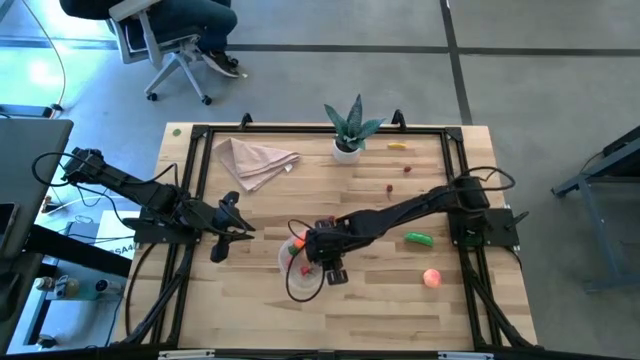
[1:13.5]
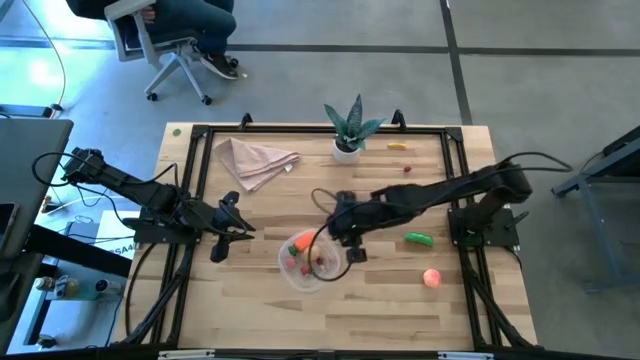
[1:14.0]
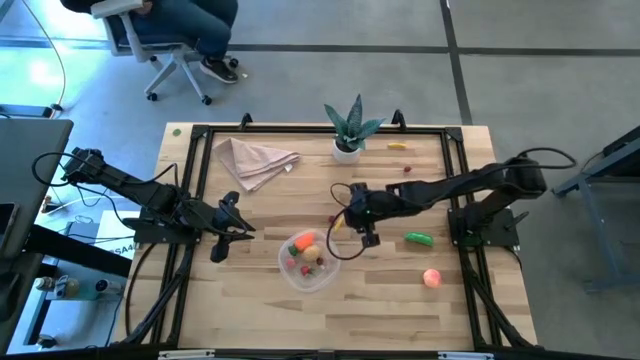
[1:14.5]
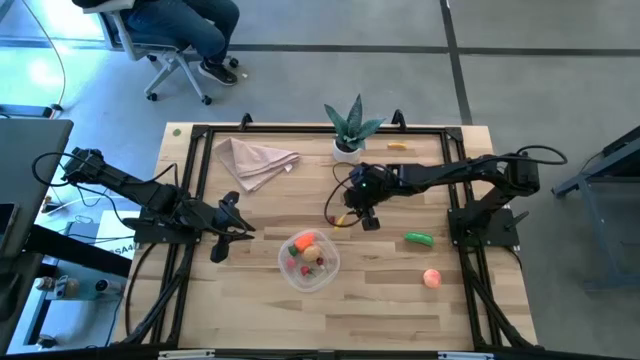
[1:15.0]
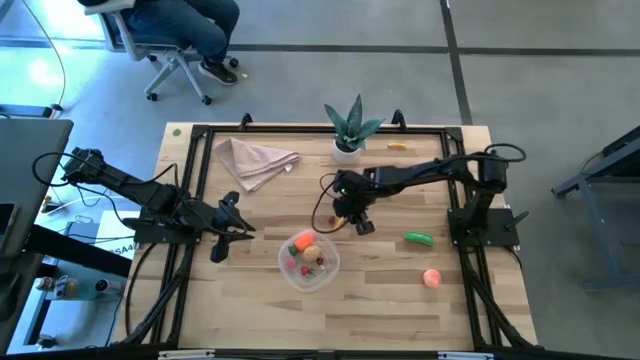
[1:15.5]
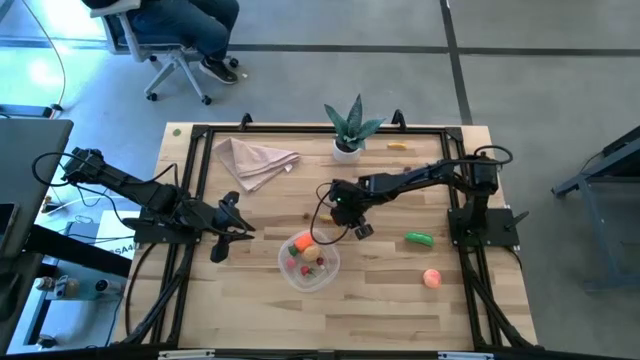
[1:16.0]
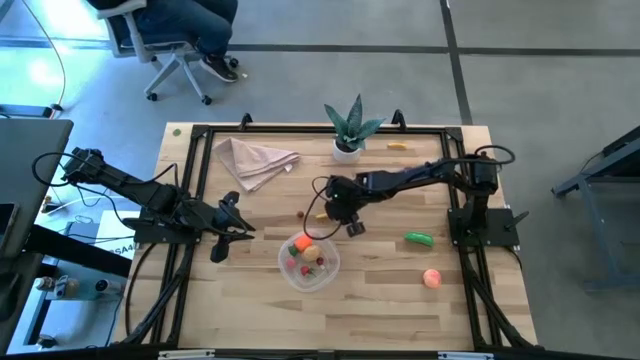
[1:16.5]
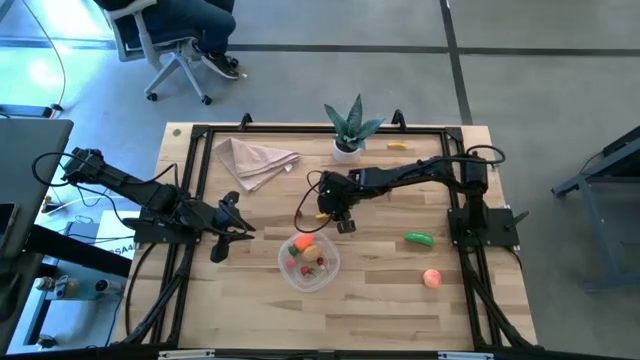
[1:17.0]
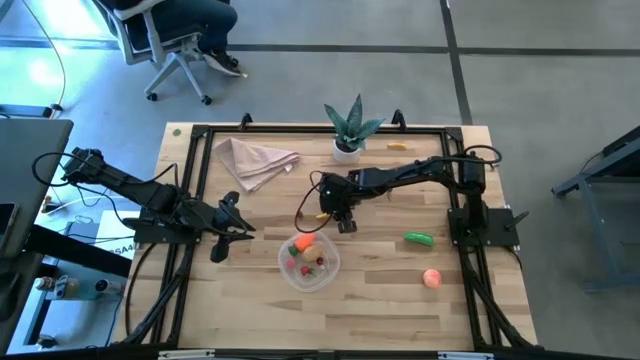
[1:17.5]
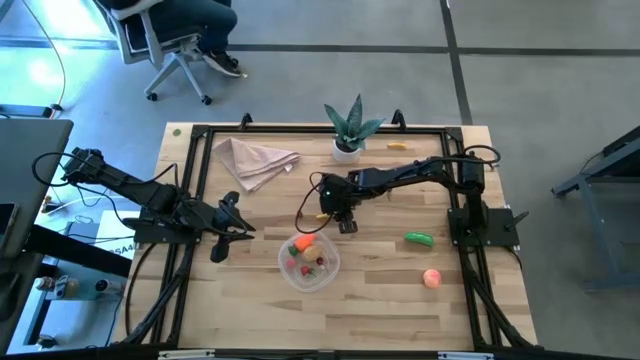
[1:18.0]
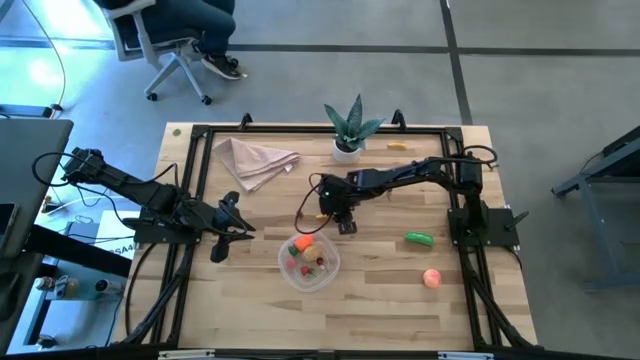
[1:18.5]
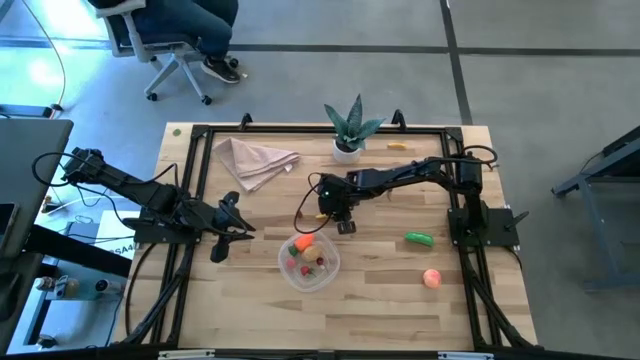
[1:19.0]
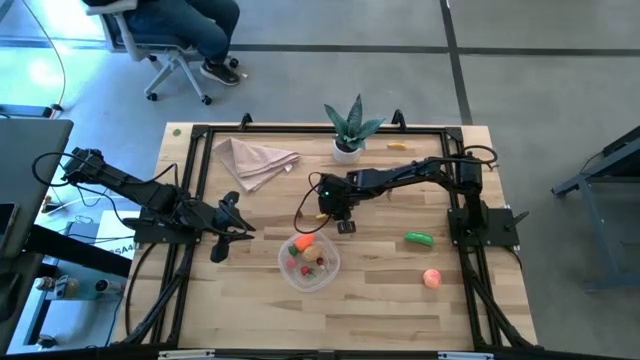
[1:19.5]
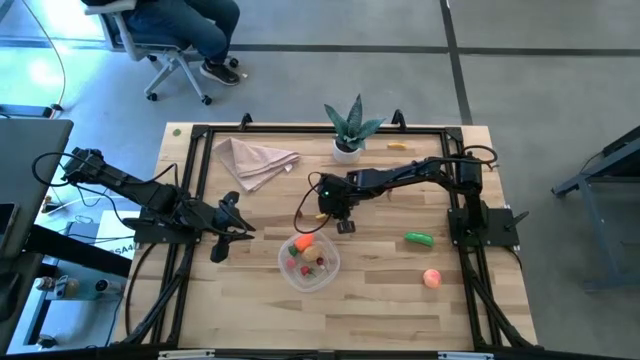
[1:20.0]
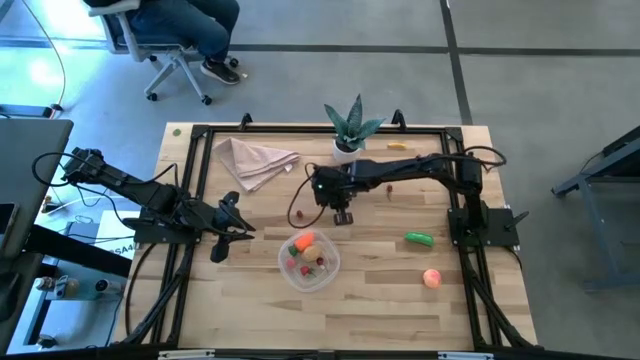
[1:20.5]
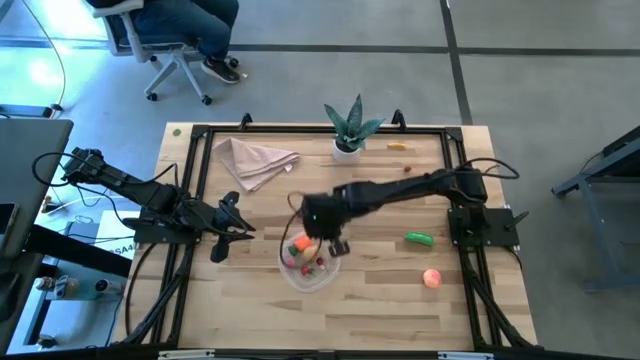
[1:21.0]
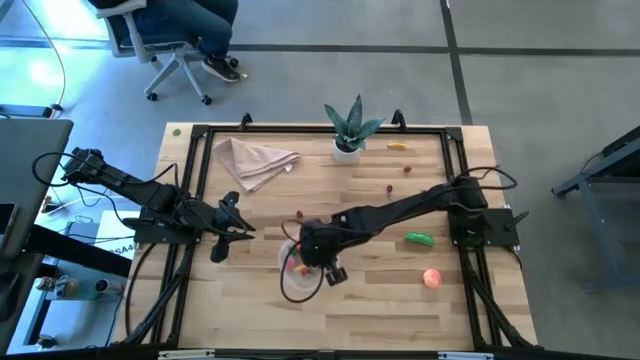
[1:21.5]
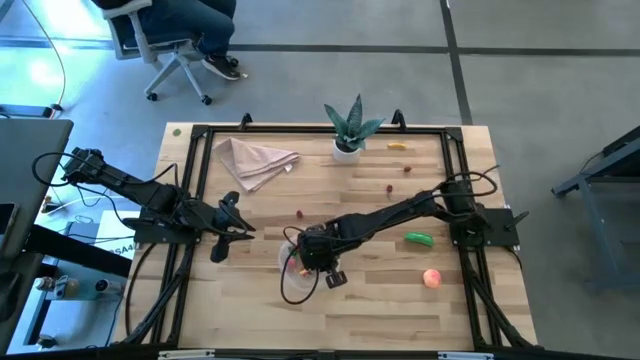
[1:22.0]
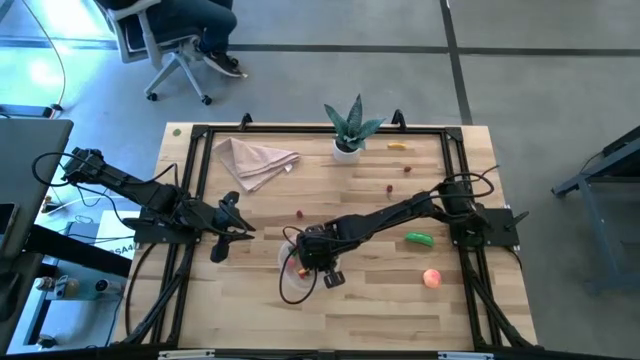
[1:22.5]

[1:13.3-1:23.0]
Task: Pick and placing Produce into tupperware
Put the bottom corn into the transparent container

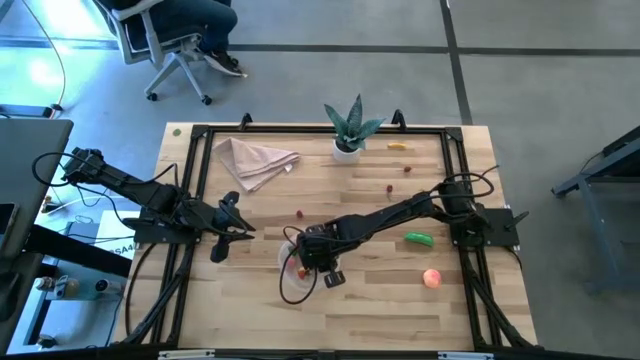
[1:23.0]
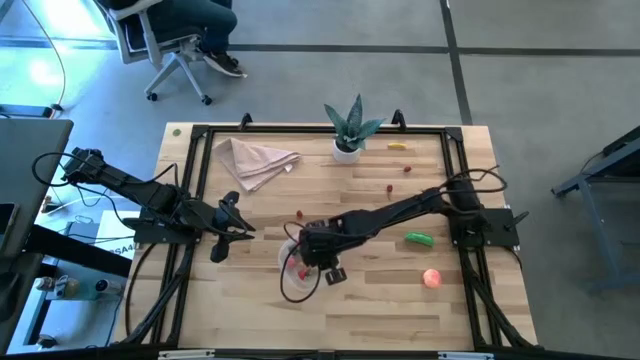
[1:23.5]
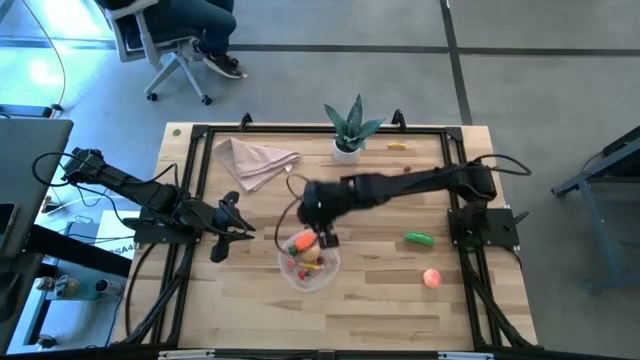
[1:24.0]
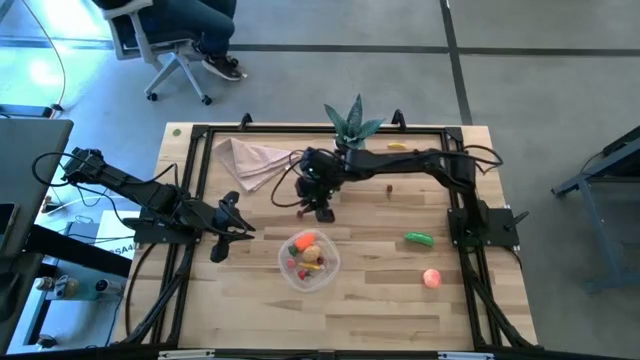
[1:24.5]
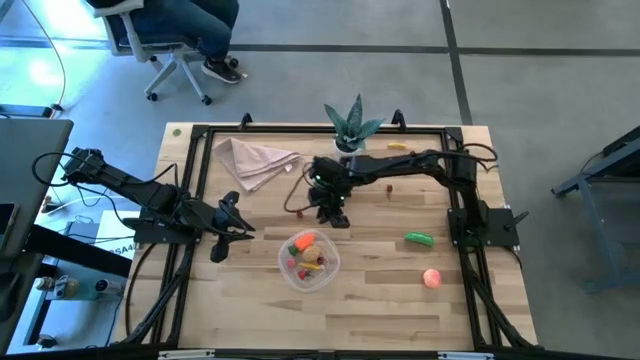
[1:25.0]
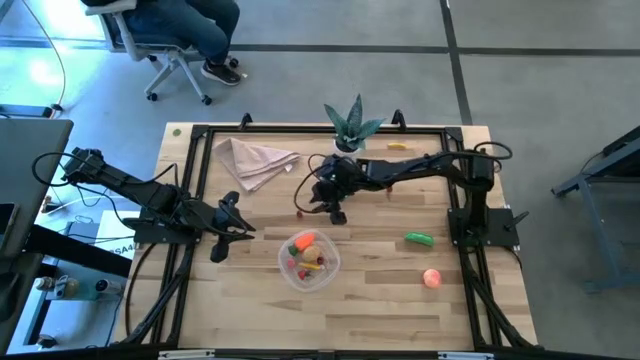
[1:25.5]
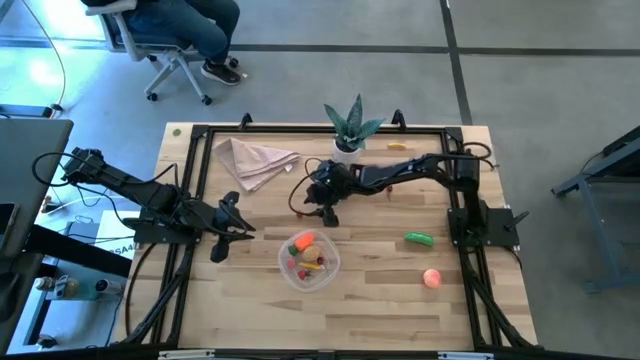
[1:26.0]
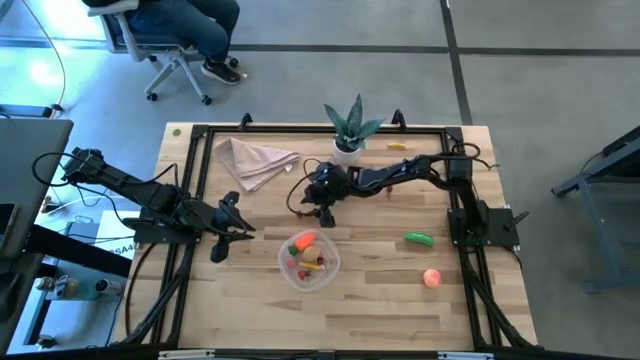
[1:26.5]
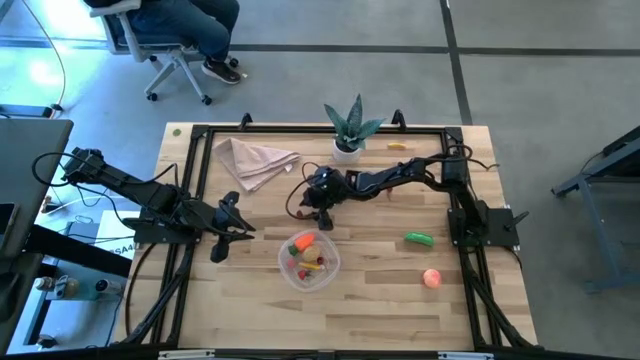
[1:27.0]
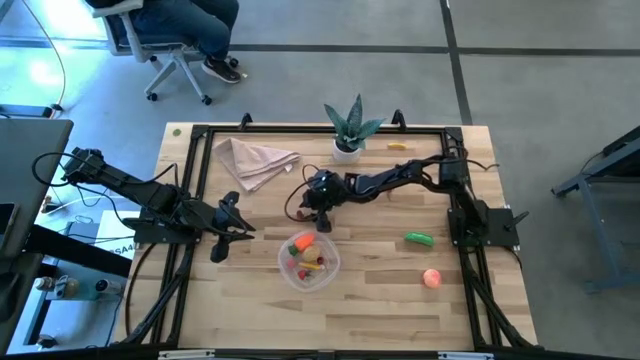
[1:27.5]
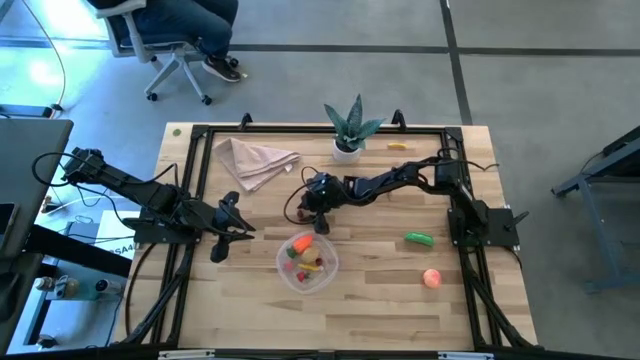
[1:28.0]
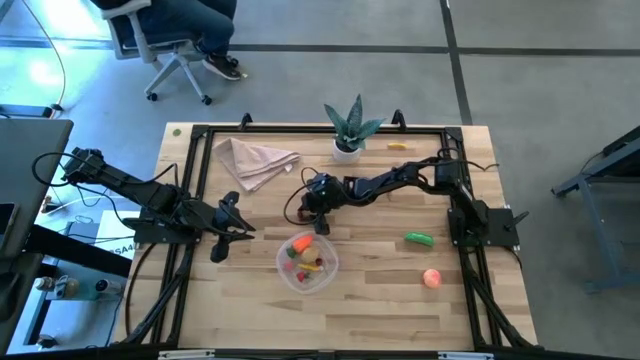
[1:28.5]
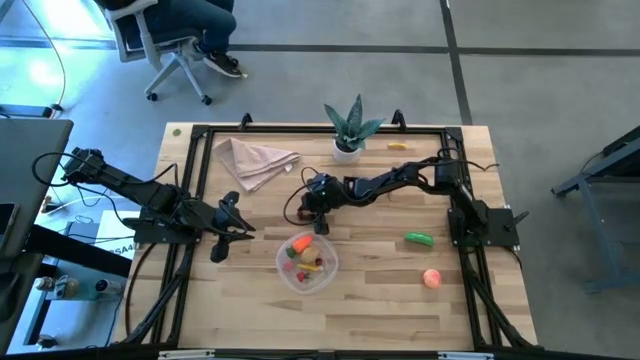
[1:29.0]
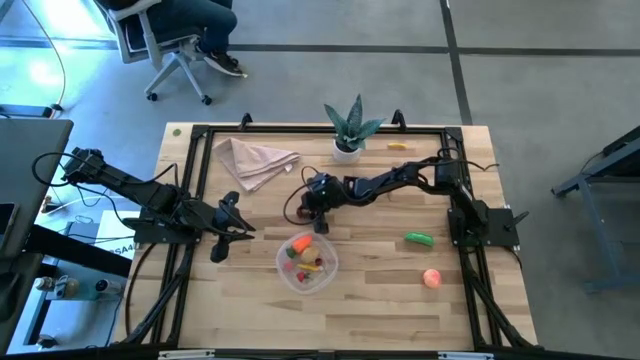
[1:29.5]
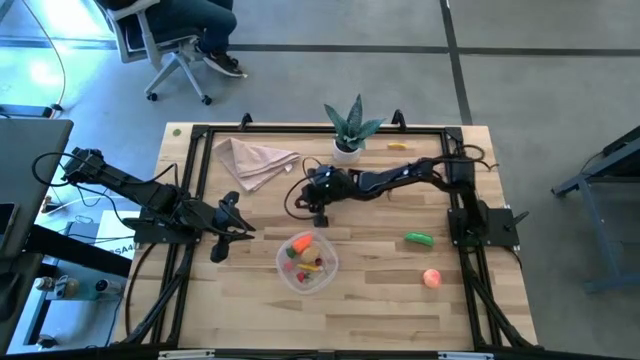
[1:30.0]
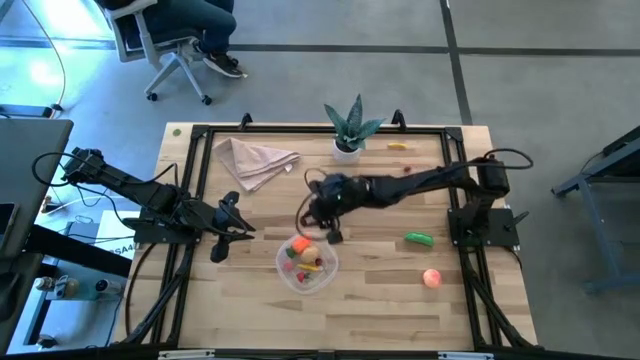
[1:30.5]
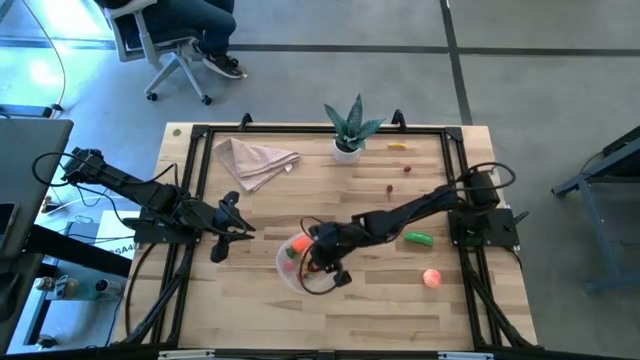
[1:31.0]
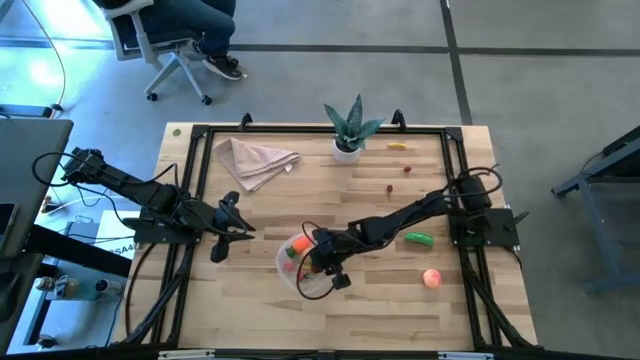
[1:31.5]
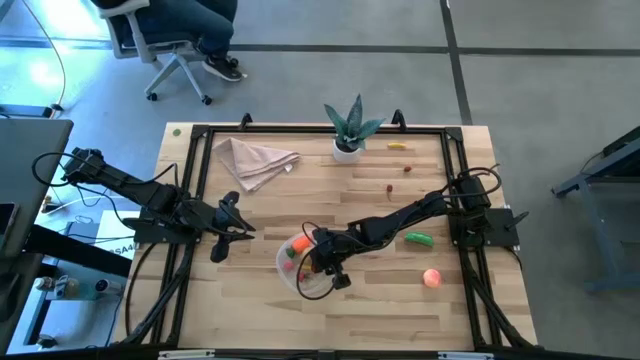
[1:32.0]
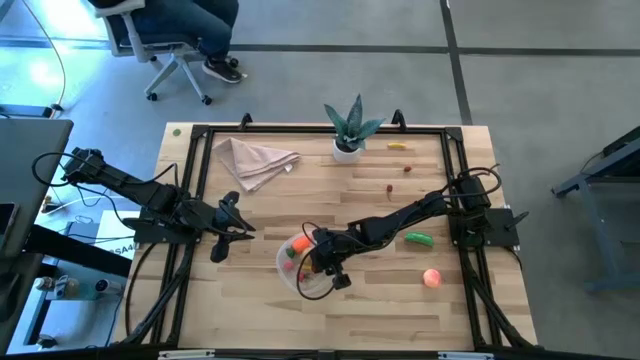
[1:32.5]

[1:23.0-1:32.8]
Put the bottom left cherry into the transparent container
